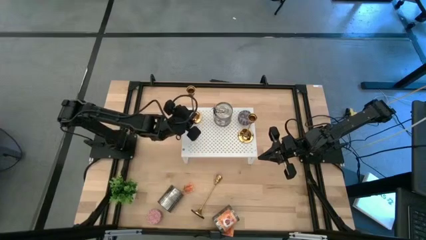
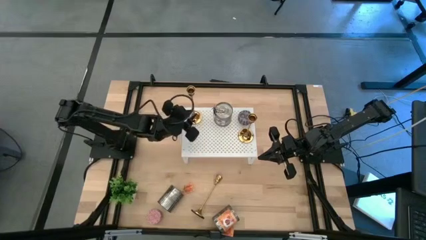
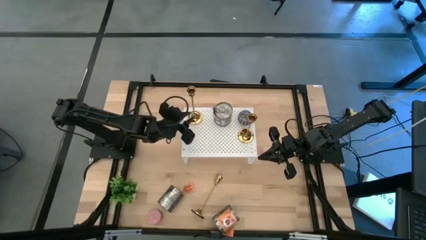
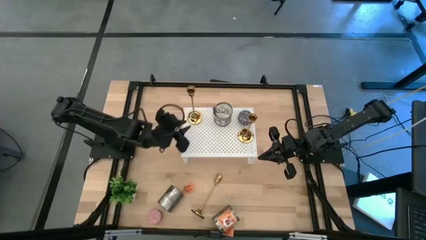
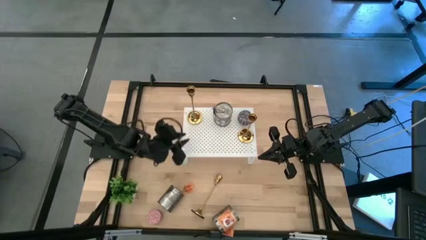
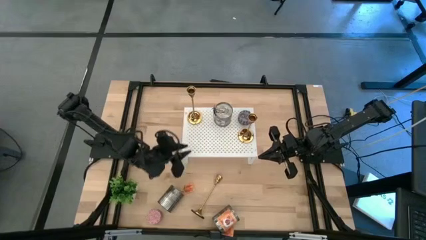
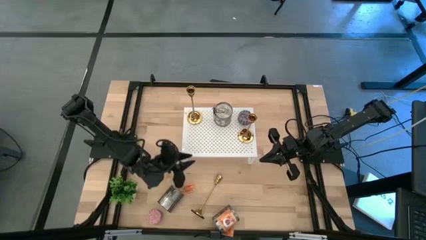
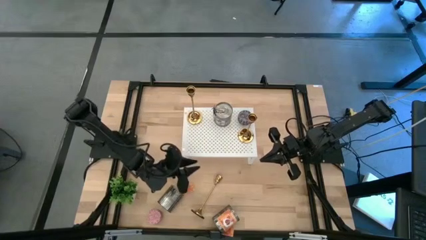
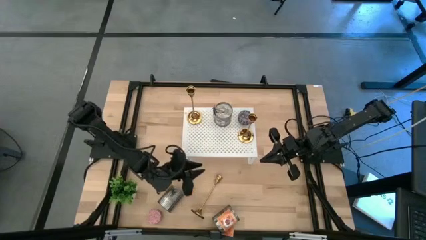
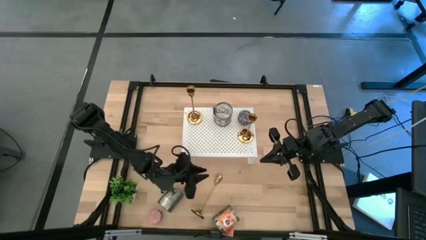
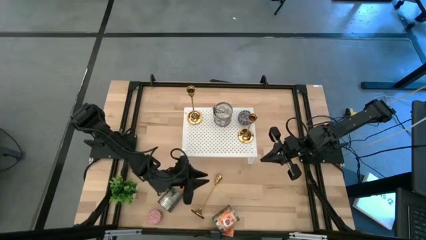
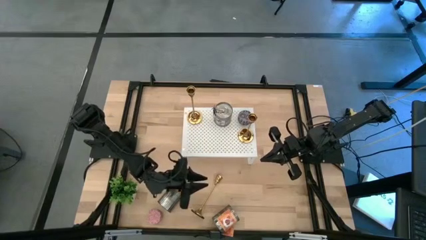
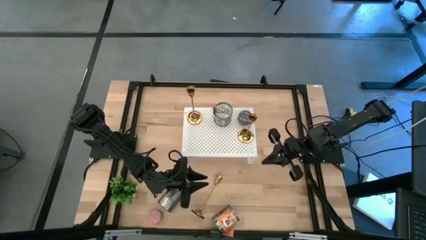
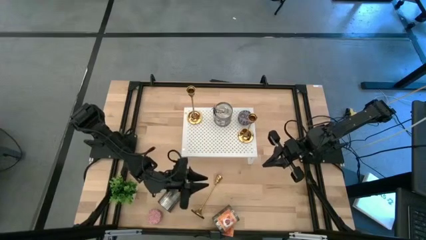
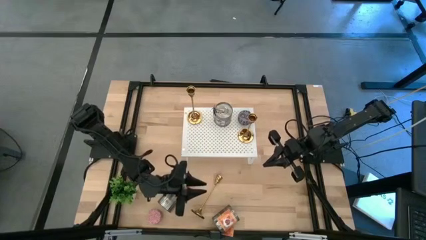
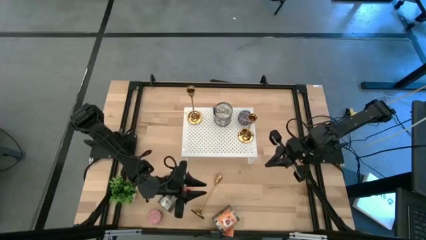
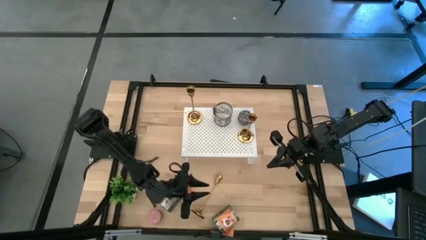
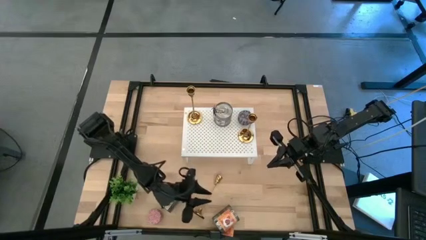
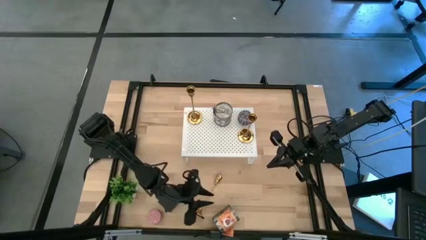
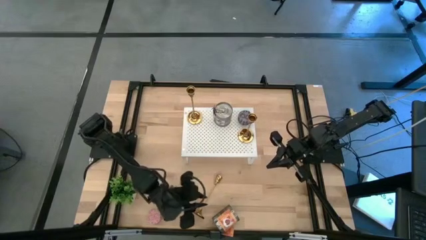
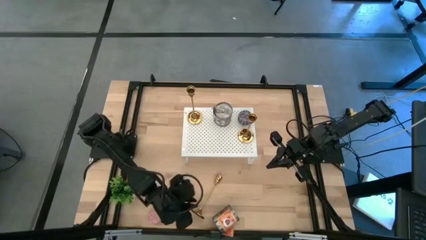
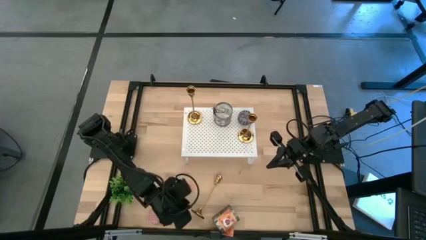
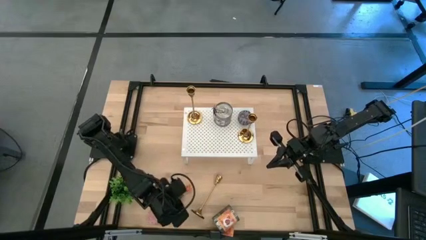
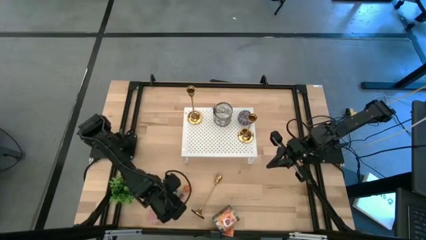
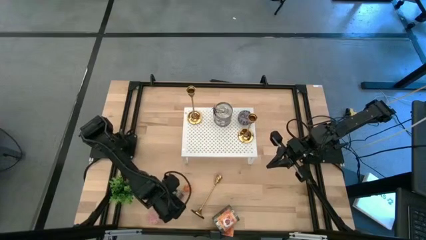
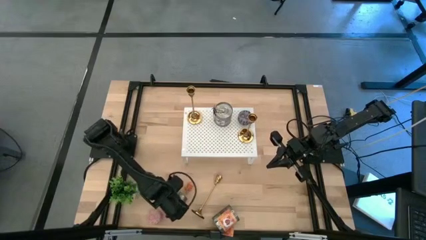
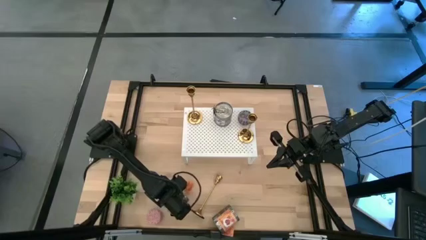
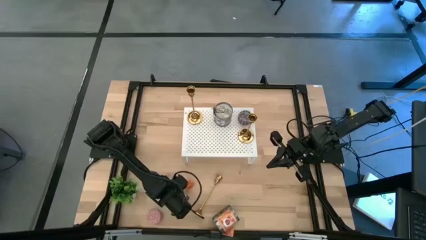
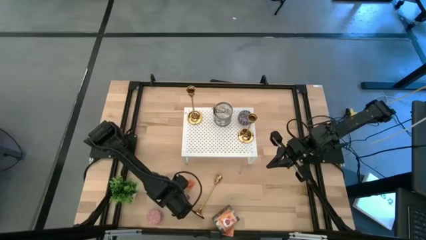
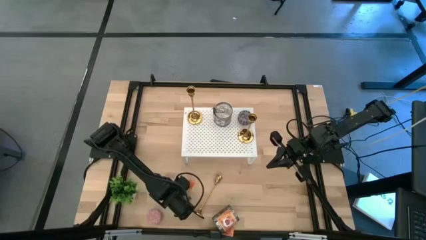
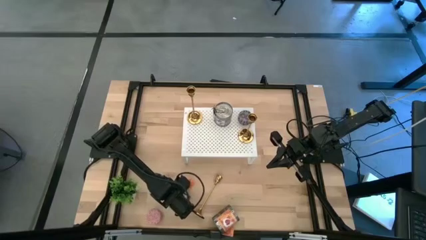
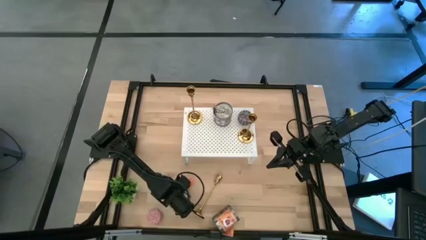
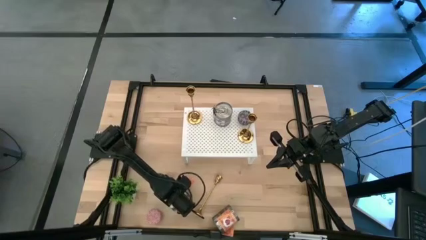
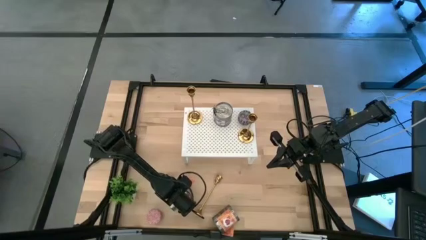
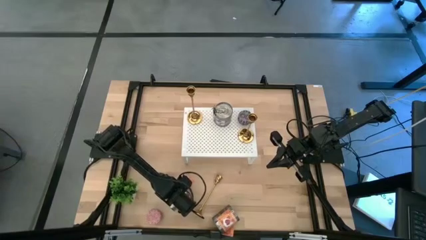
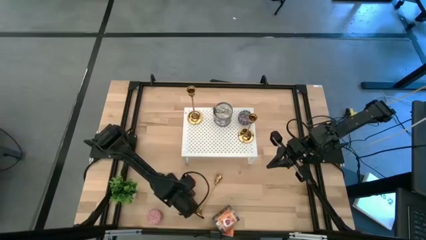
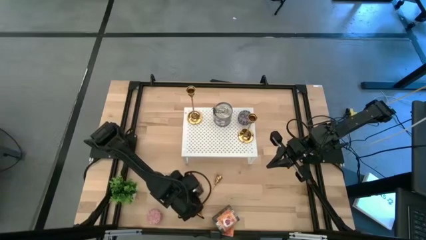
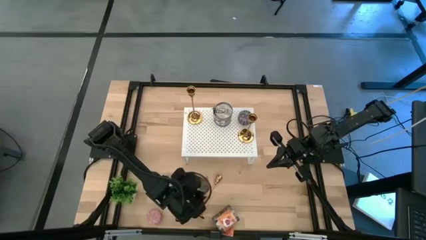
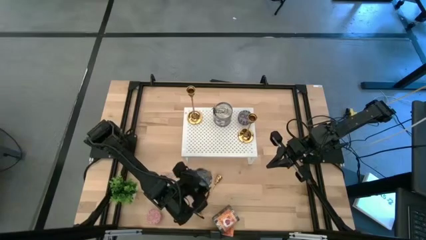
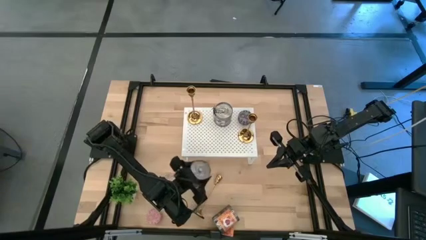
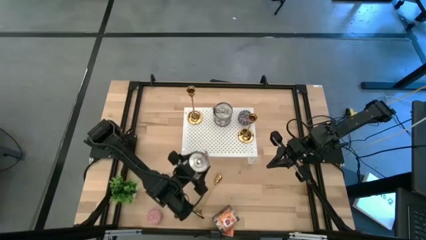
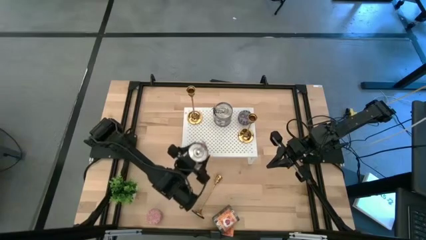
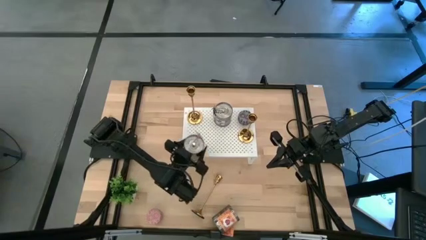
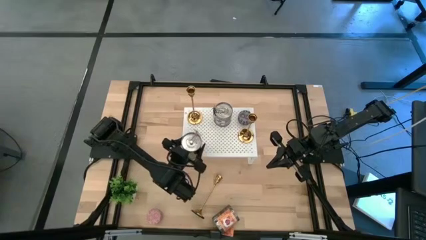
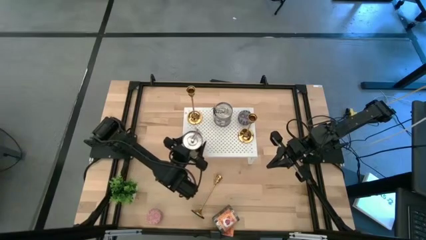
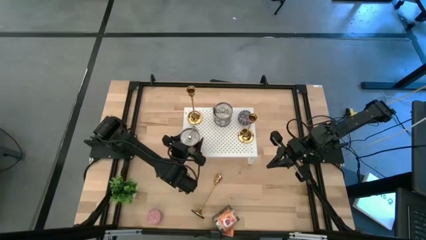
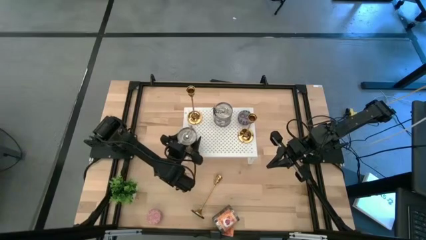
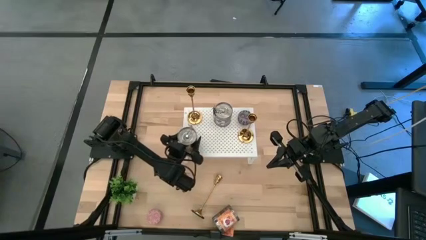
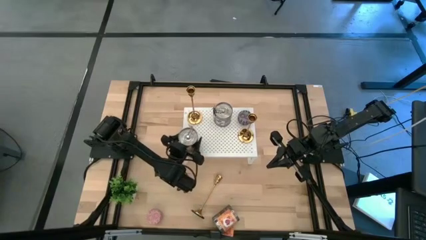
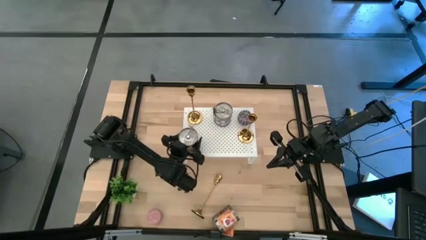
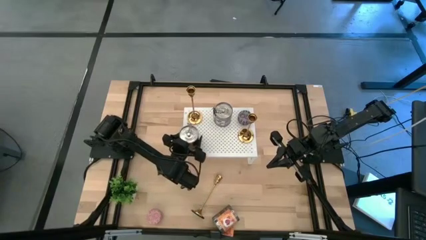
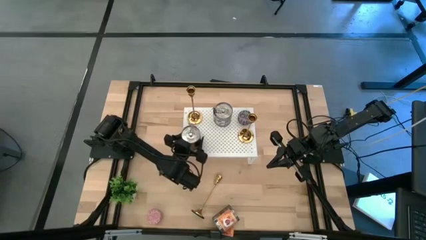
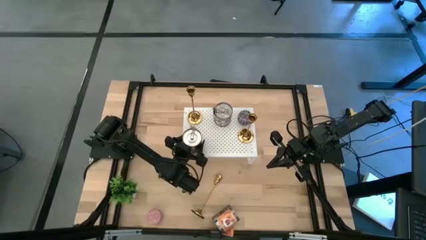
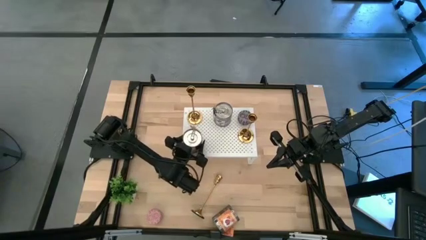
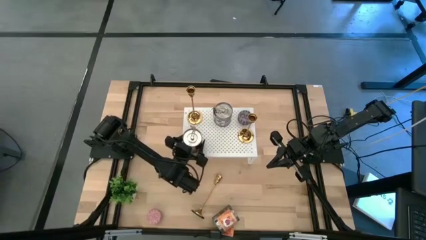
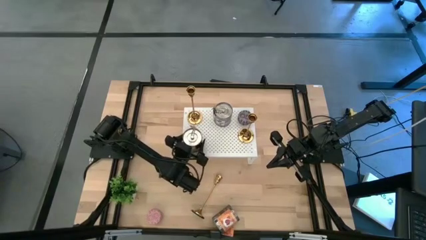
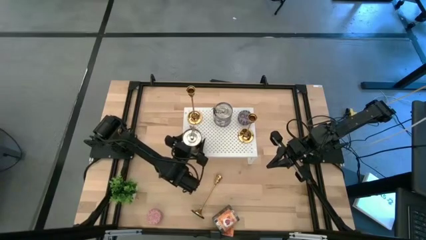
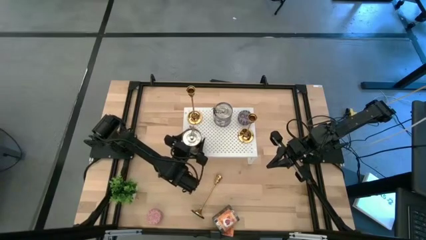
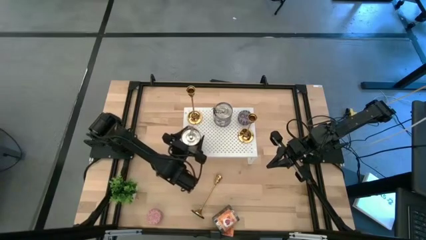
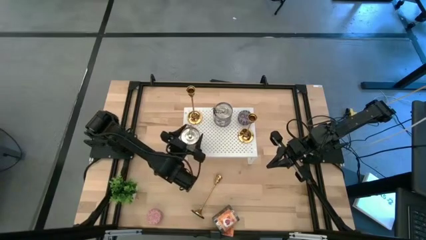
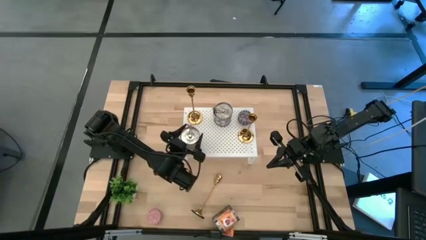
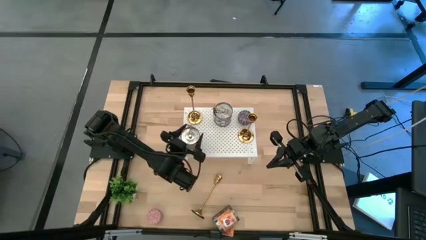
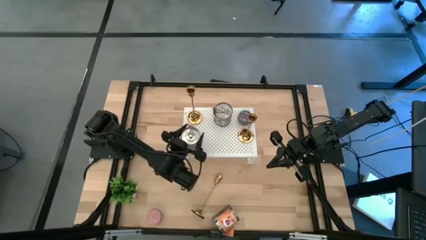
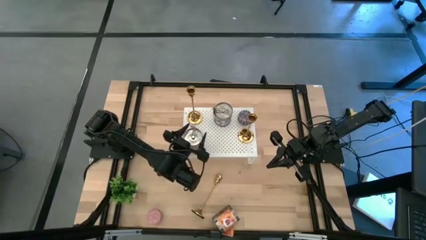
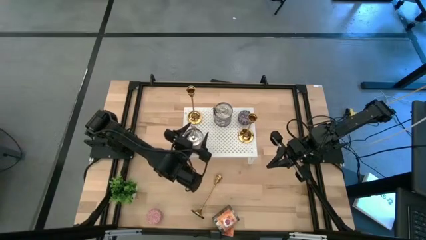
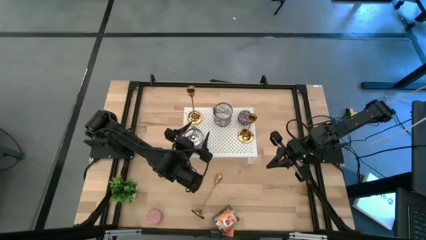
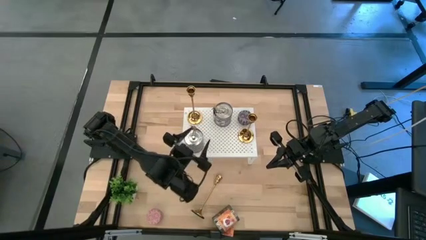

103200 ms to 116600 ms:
Task: Pick & Place candle stick holders
Put the left big silver scented candle on the shelf

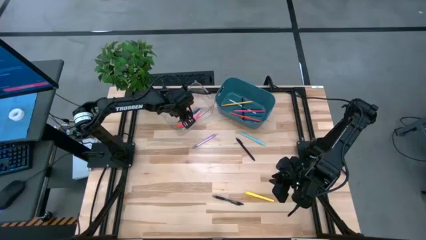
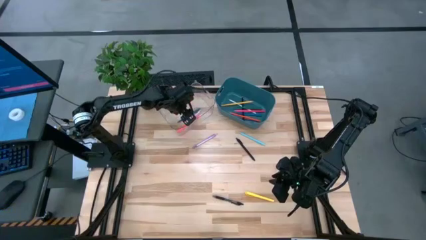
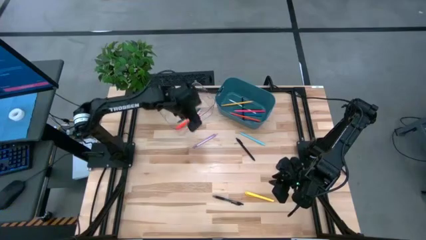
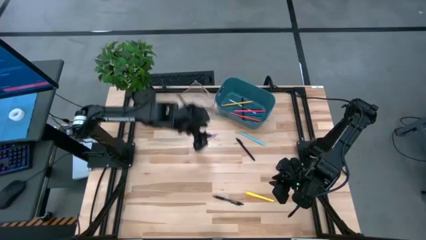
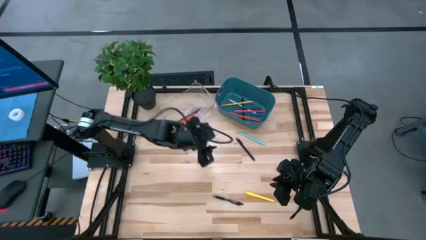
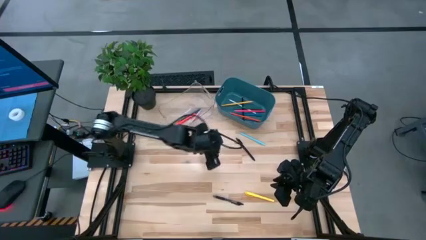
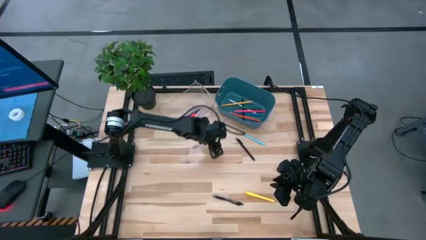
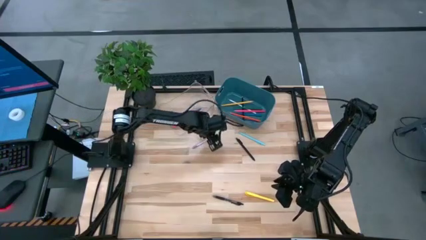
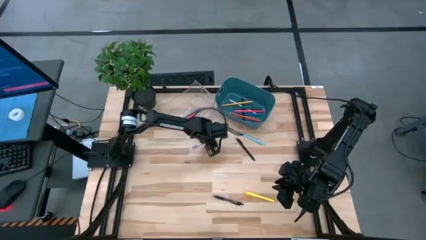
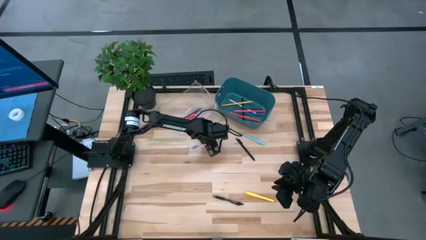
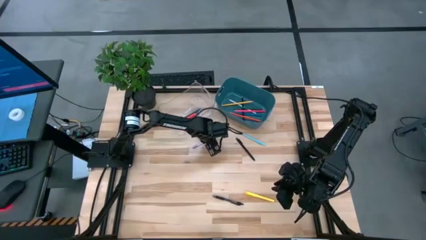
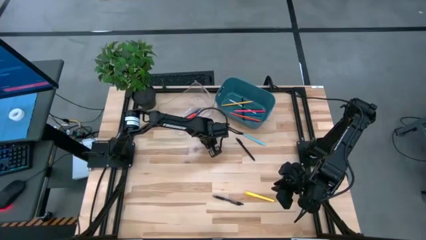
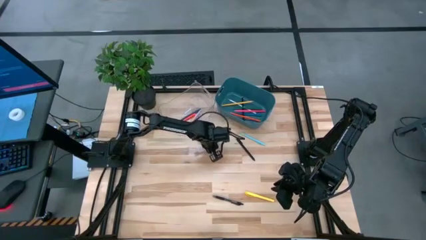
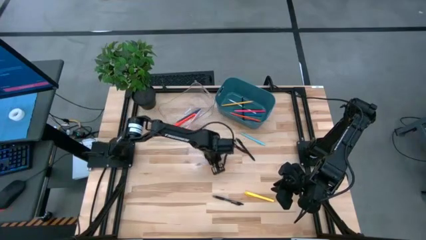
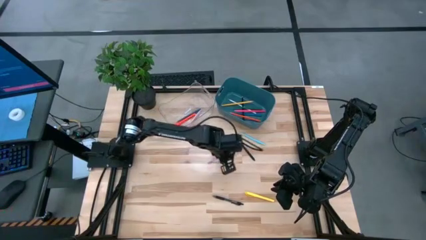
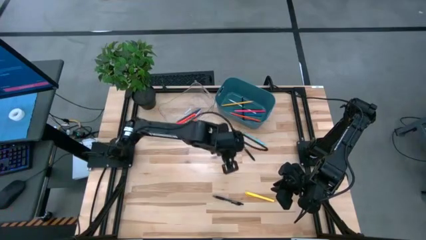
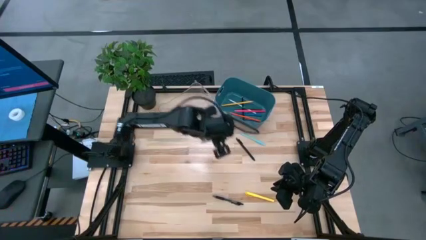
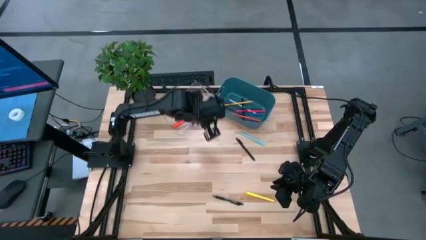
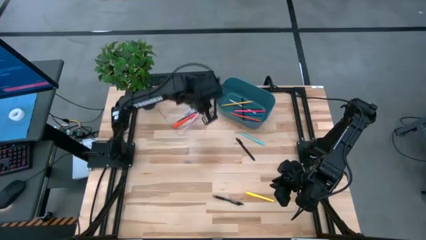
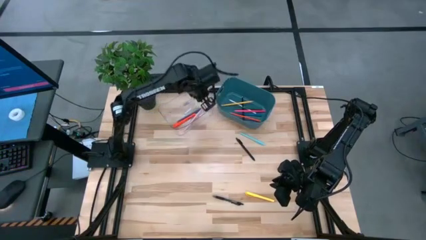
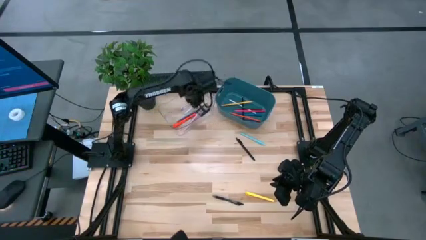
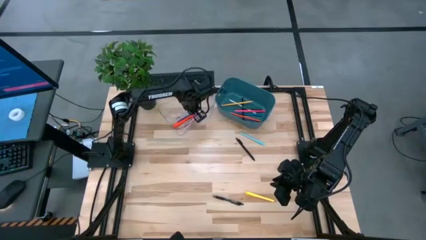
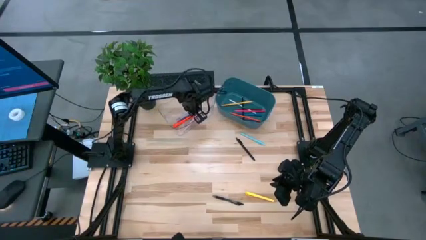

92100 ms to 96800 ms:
Task: Sort pens & pencils
Put the purple pen into the transparent bin
